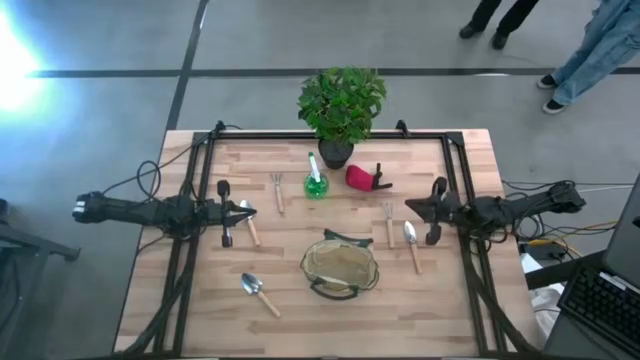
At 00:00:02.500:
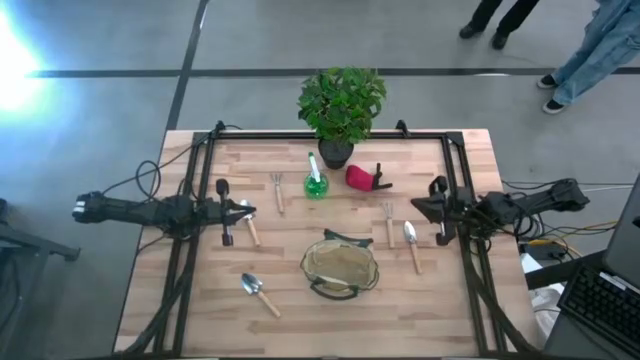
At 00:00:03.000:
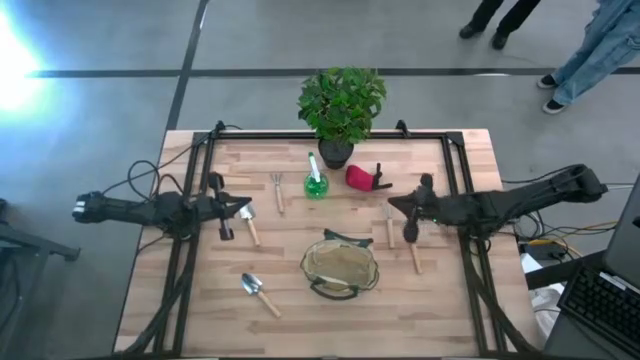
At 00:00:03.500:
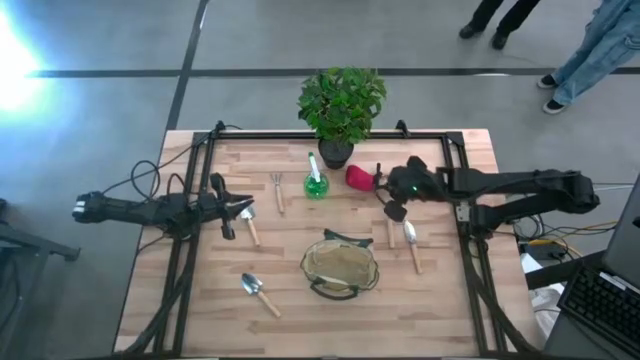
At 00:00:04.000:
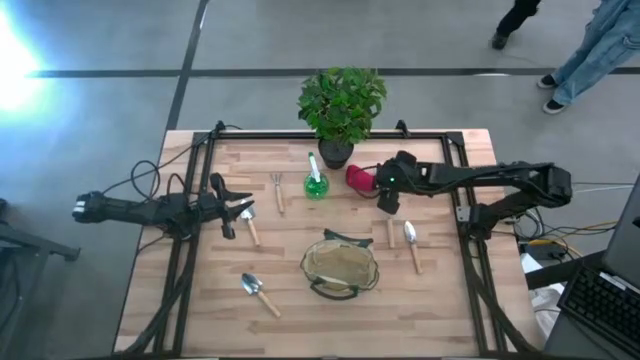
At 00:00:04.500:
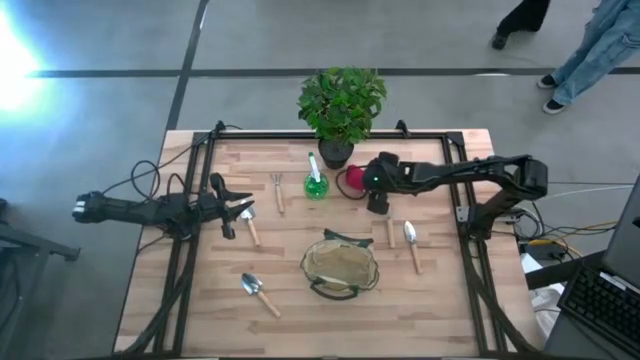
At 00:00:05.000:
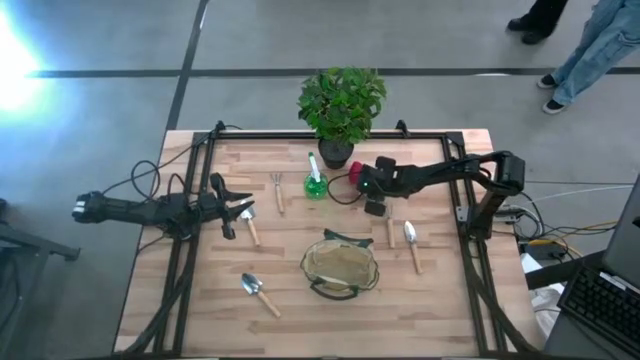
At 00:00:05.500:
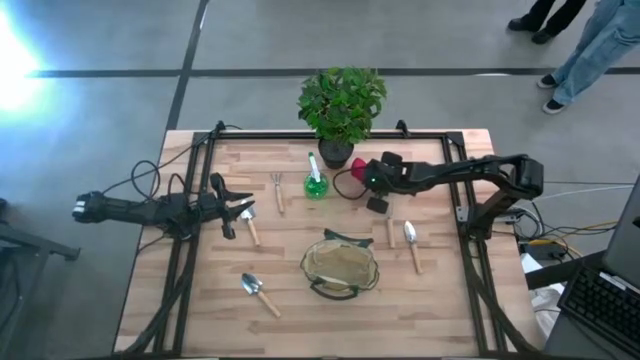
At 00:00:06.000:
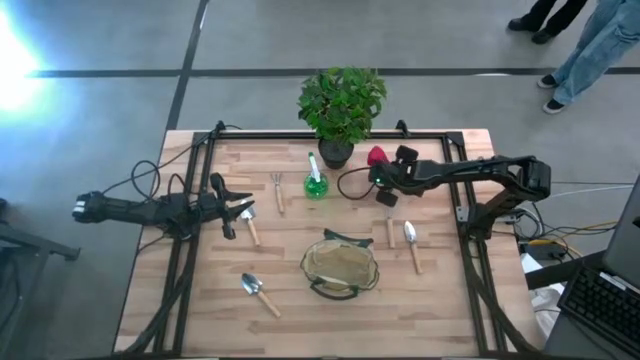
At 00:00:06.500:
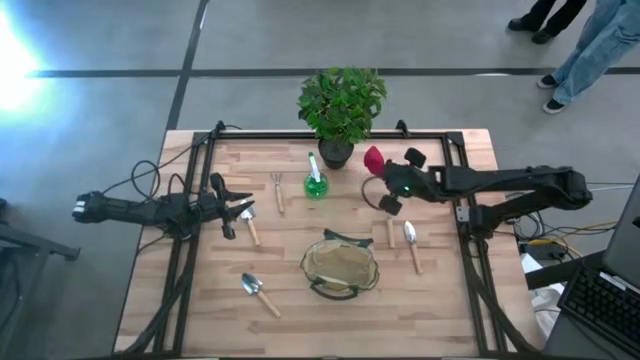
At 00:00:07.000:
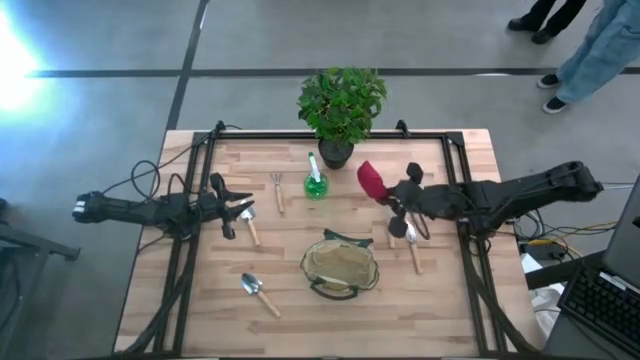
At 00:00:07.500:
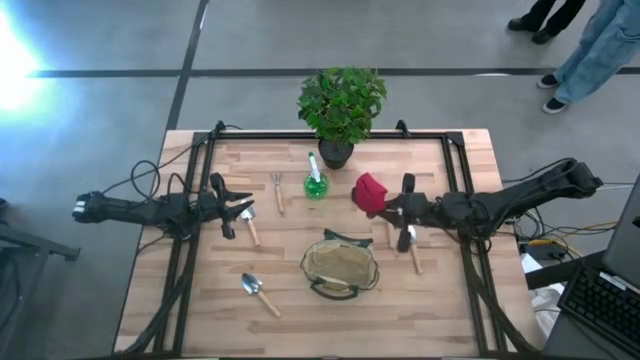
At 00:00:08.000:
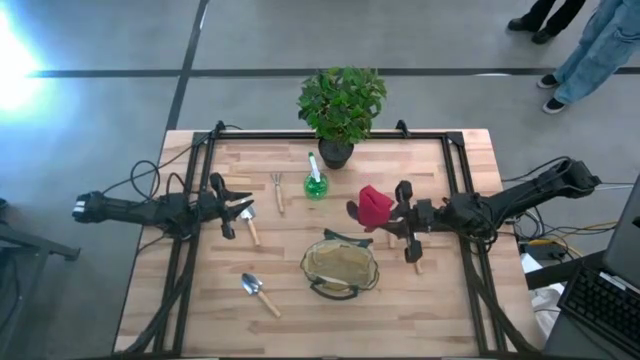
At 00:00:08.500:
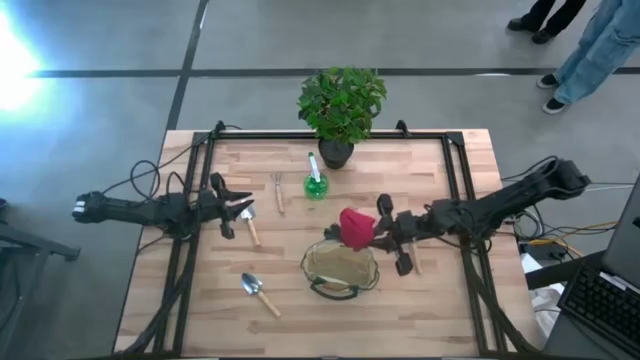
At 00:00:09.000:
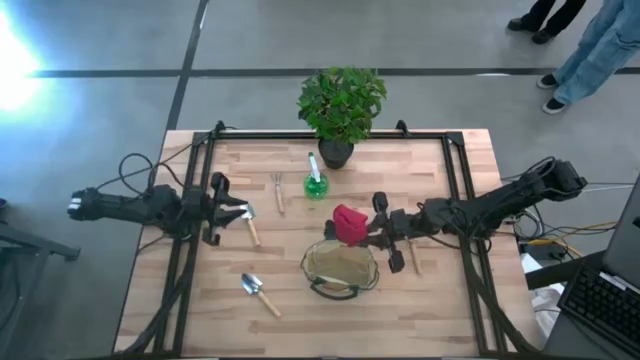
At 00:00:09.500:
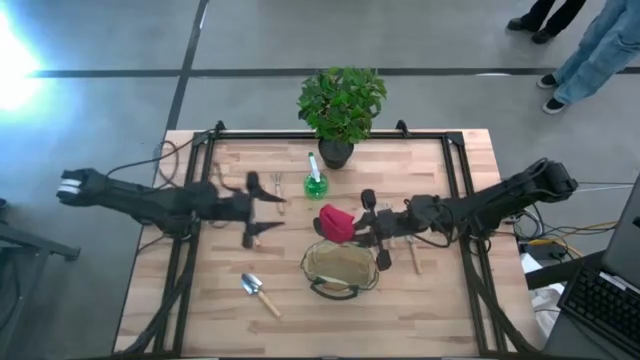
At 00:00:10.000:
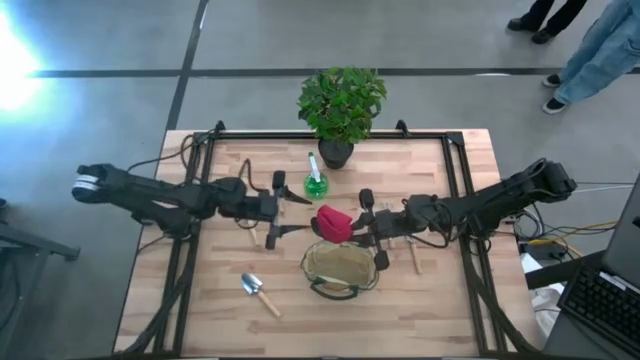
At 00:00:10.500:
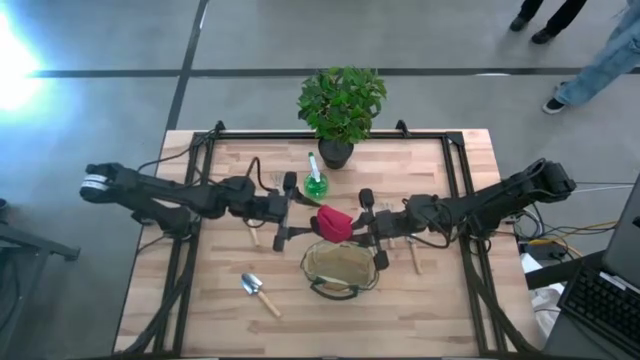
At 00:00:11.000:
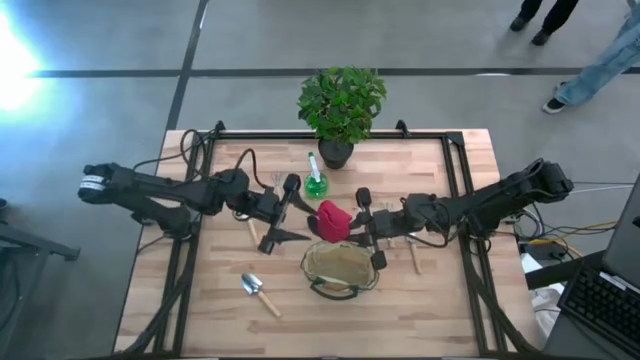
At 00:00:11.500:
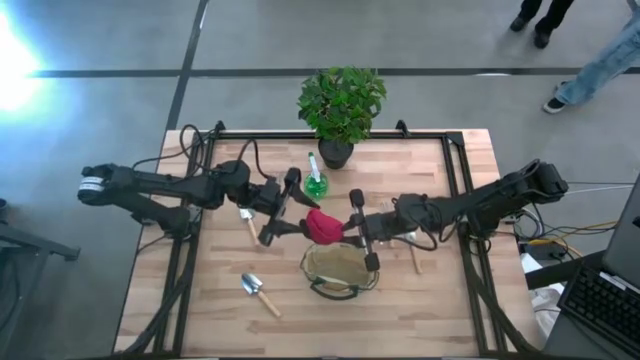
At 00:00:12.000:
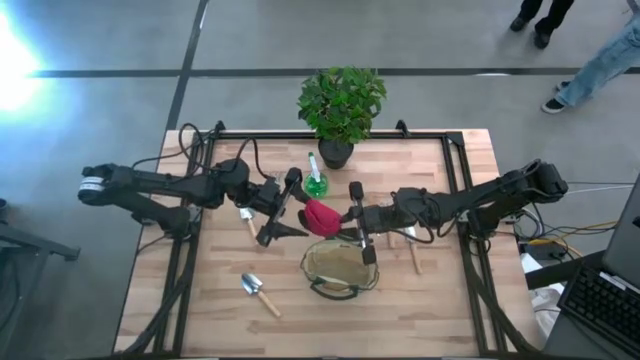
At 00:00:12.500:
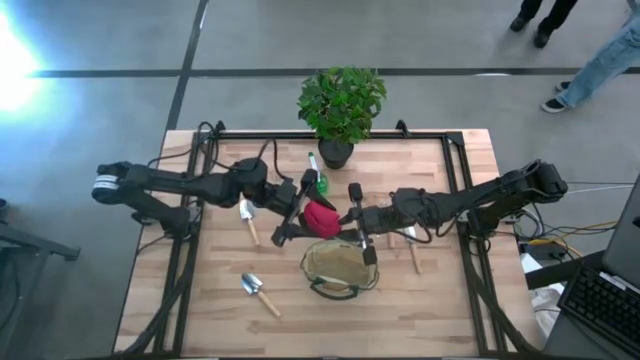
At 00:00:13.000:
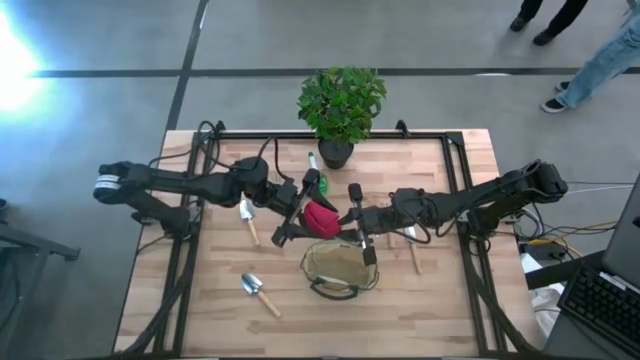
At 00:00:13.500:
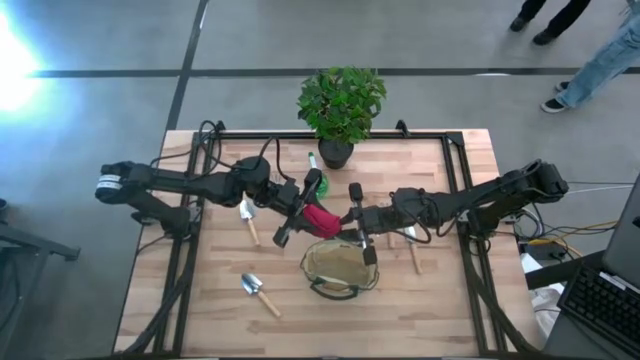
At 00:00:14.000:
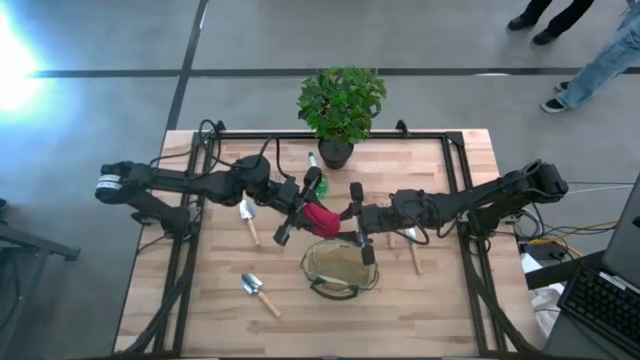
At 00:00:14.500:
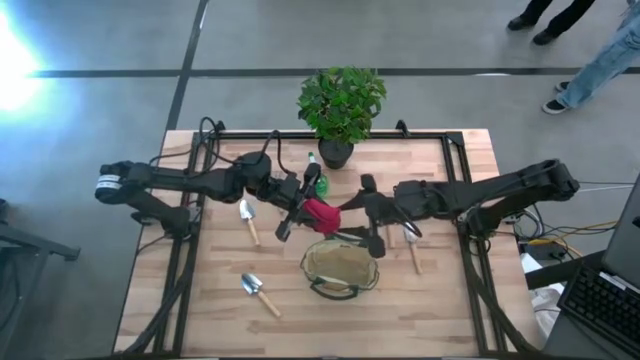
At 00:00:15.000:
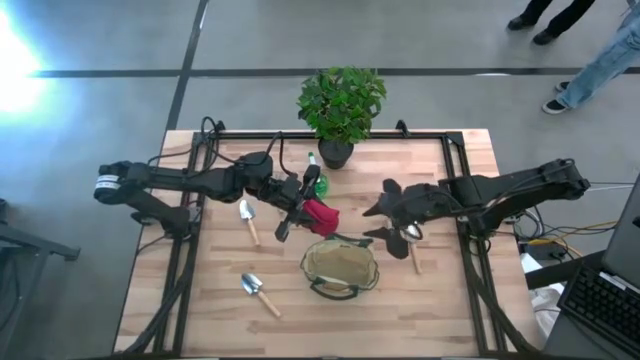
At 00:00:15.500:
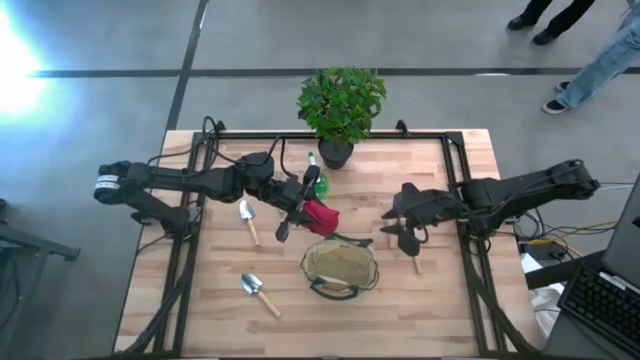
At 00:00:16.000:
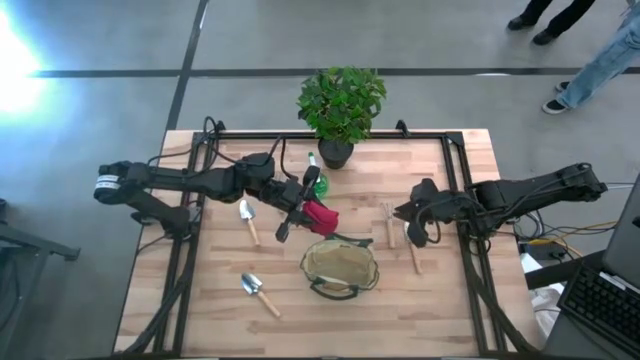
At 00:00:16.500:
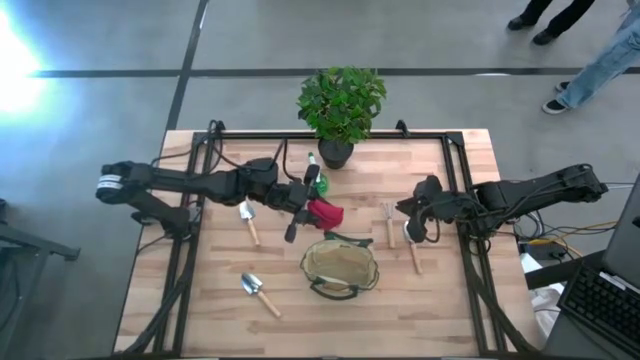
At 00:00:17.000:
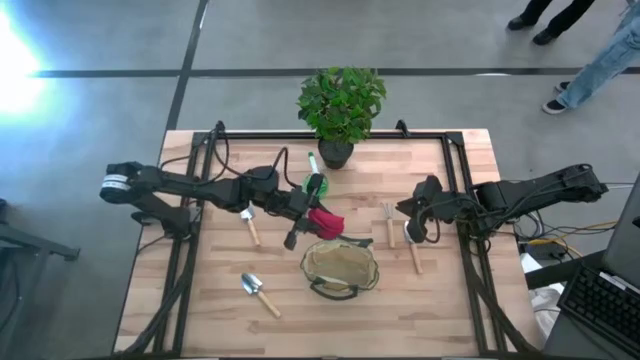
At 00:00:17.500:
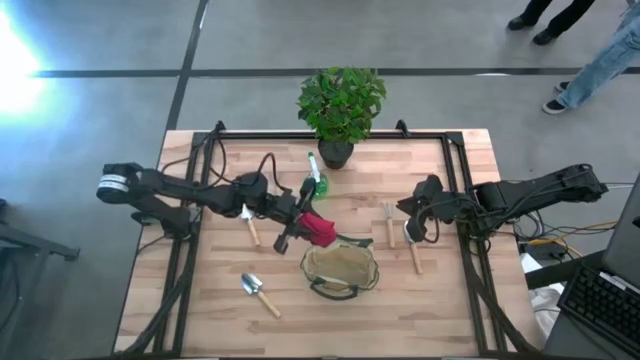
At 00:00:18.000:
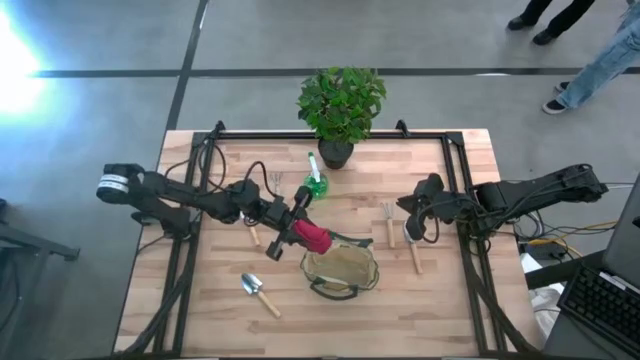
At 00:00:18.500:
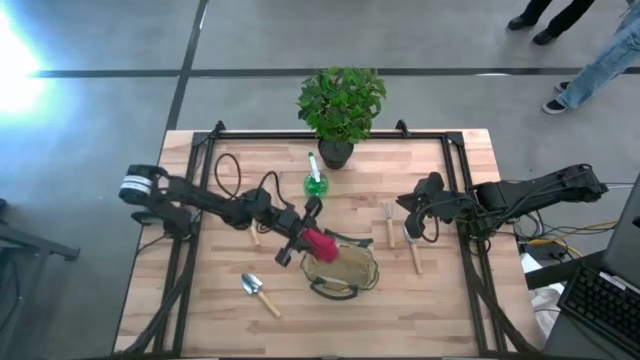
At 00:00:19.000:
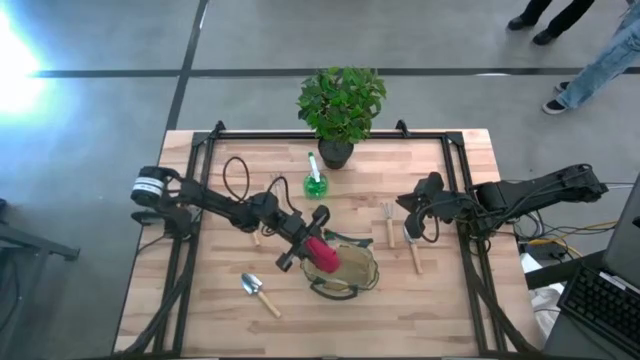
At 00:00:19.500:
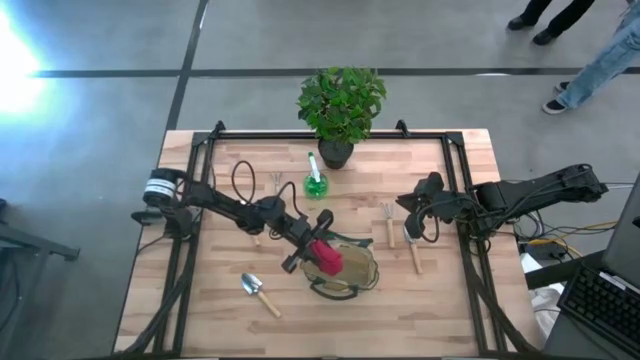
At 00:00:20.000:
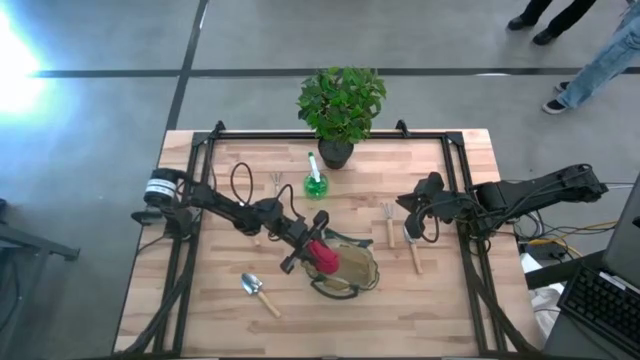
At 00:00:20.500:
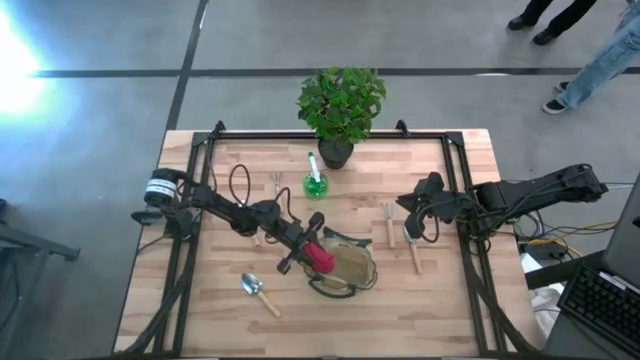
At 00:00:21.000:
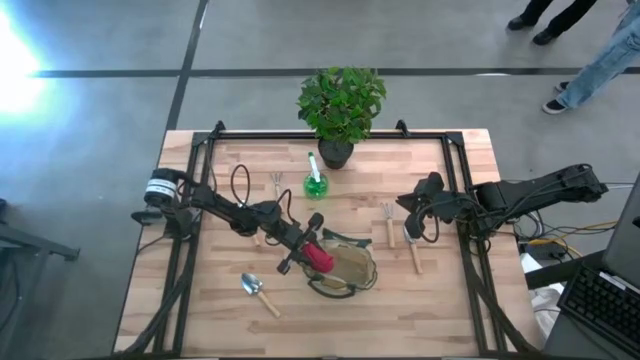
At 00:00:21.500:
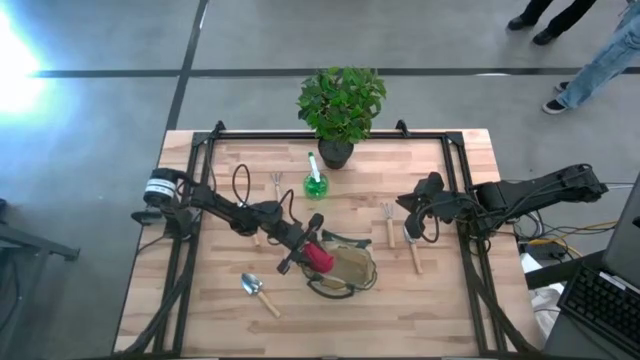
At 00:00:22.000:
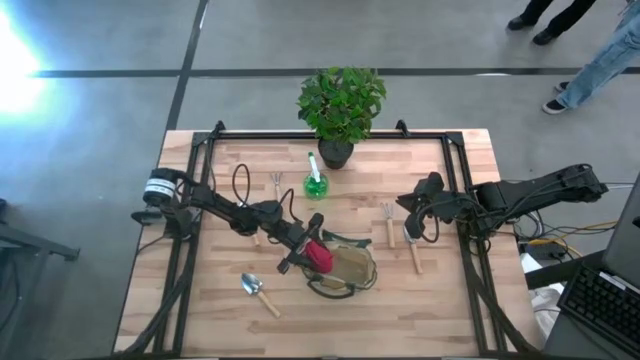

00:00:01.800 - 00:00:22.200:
Task: Pick & Place Garden tools in Gardening bag
Put the red gloves into the green gardening bag
